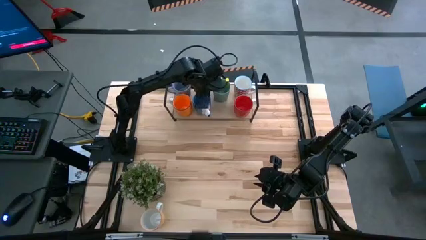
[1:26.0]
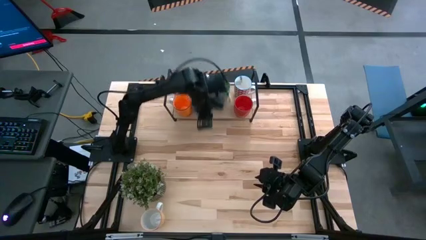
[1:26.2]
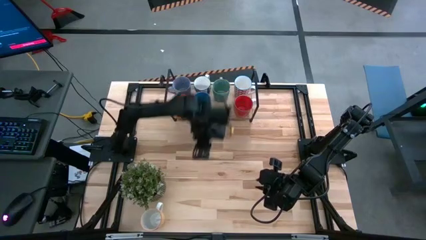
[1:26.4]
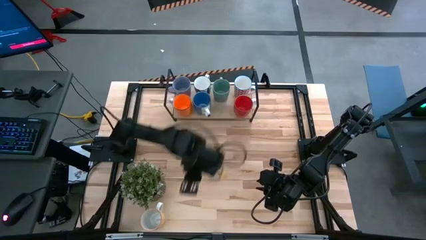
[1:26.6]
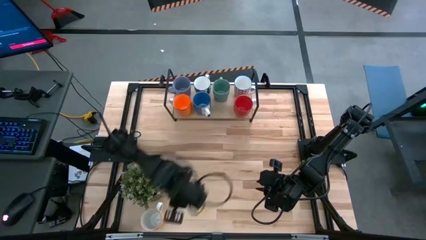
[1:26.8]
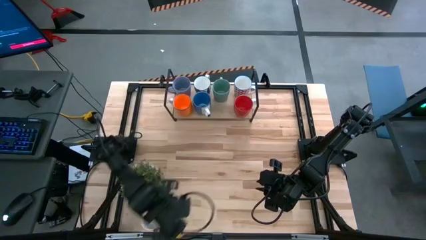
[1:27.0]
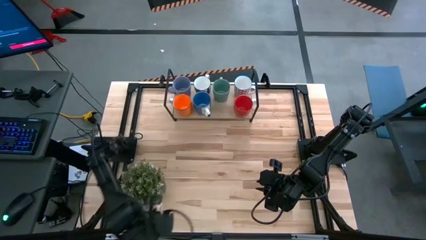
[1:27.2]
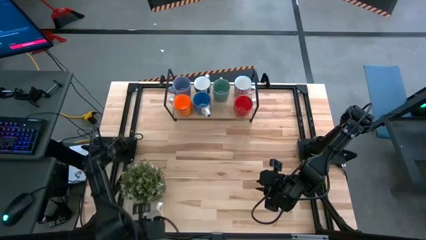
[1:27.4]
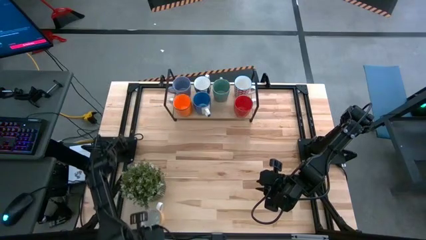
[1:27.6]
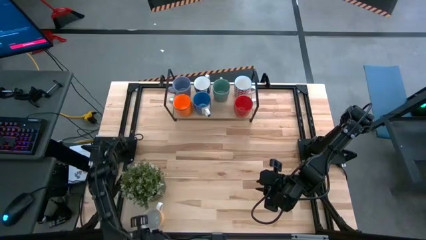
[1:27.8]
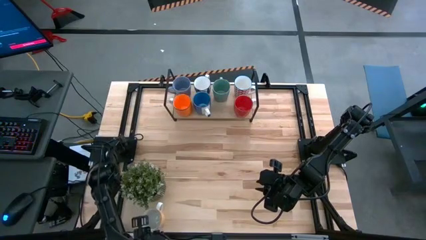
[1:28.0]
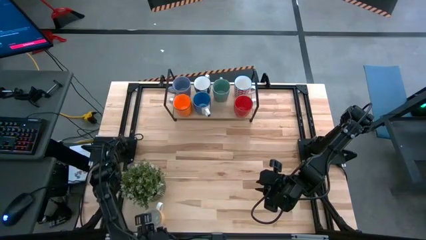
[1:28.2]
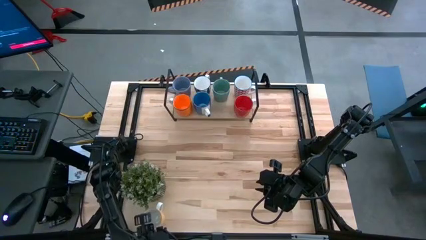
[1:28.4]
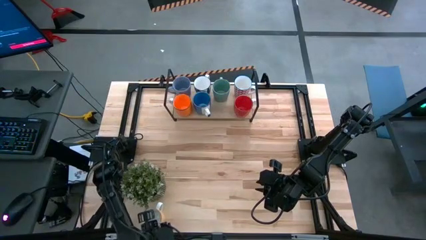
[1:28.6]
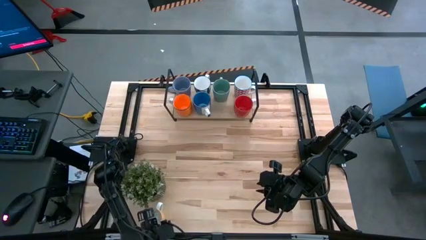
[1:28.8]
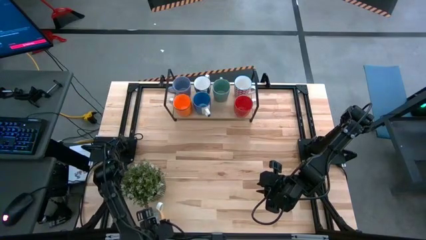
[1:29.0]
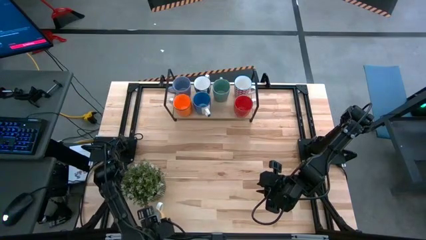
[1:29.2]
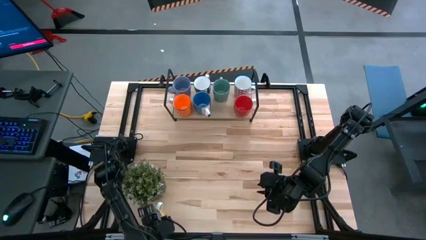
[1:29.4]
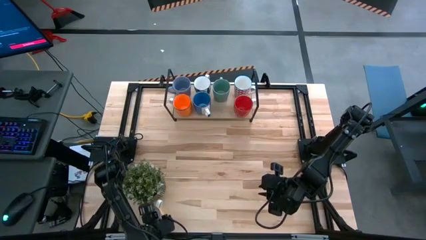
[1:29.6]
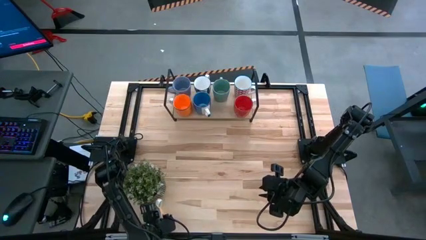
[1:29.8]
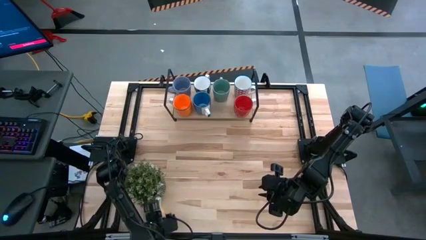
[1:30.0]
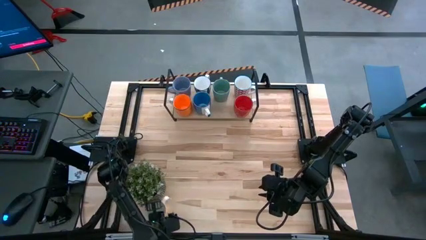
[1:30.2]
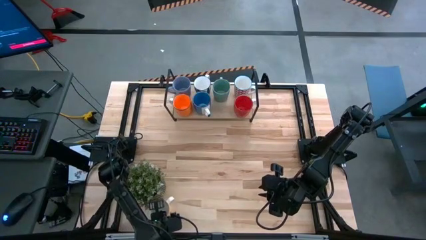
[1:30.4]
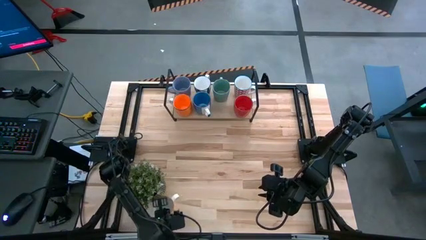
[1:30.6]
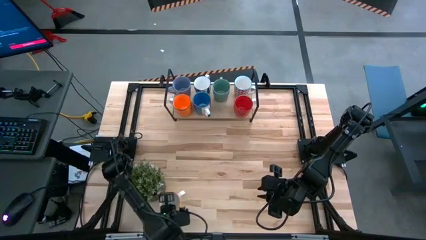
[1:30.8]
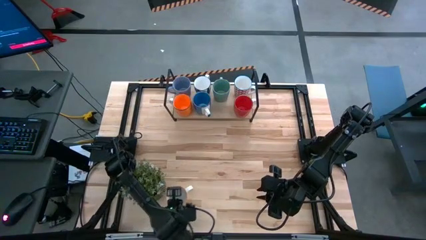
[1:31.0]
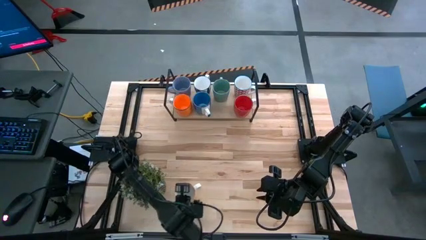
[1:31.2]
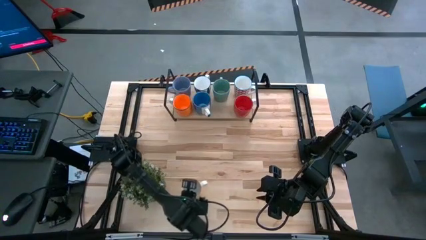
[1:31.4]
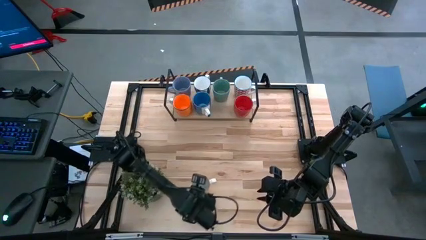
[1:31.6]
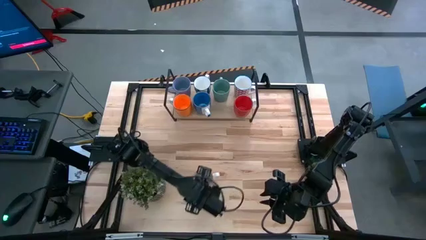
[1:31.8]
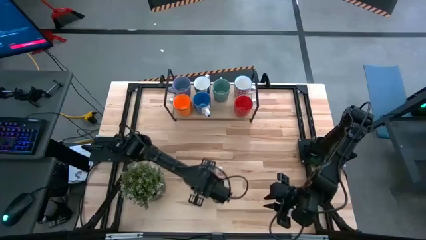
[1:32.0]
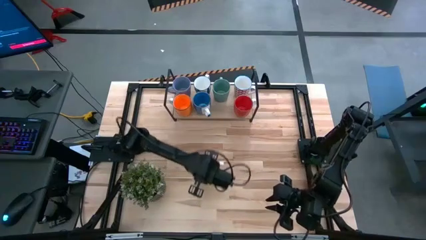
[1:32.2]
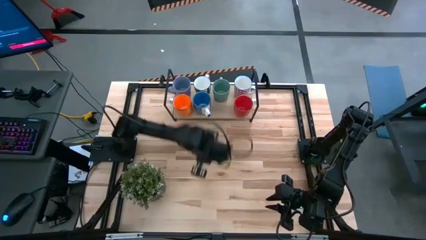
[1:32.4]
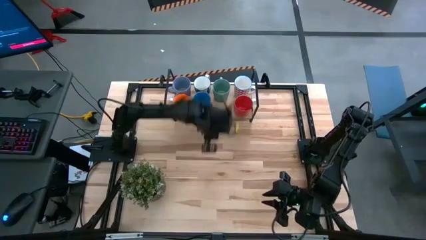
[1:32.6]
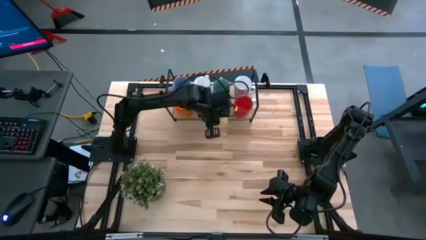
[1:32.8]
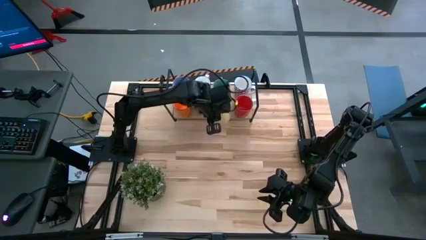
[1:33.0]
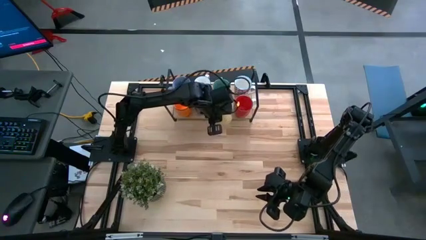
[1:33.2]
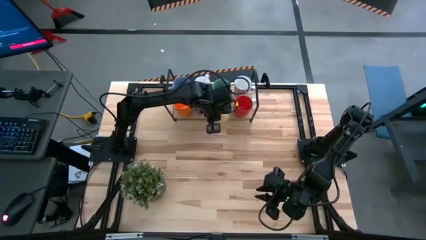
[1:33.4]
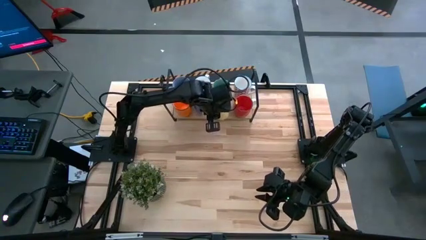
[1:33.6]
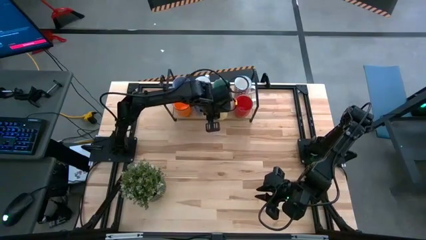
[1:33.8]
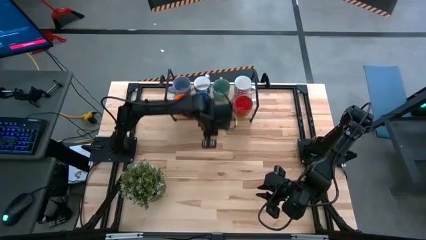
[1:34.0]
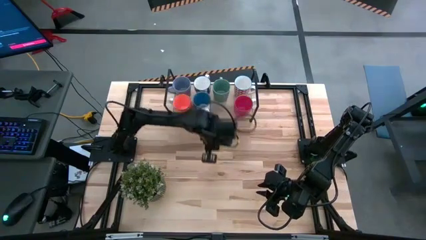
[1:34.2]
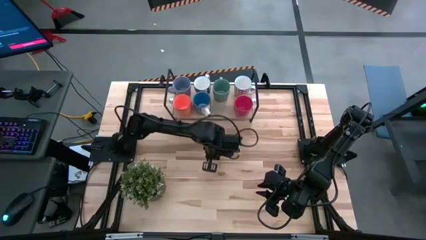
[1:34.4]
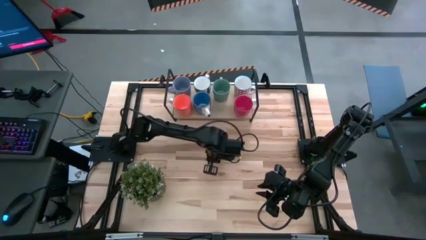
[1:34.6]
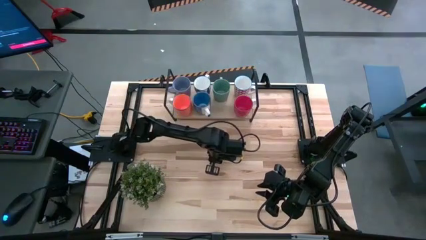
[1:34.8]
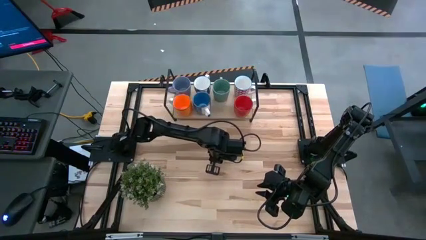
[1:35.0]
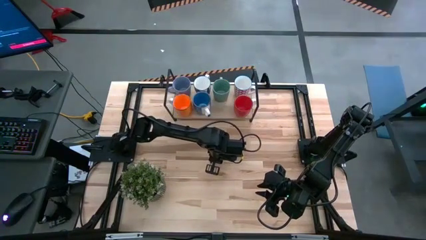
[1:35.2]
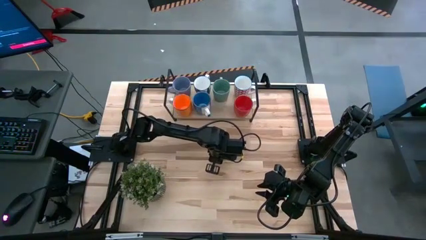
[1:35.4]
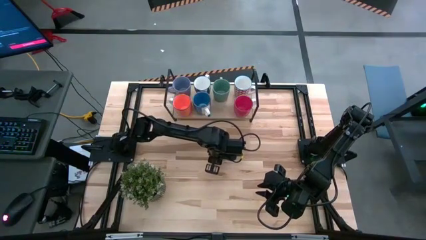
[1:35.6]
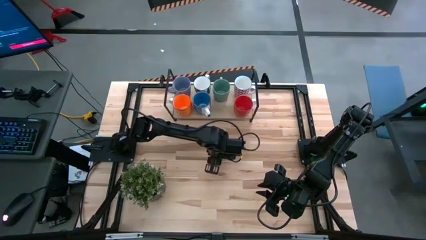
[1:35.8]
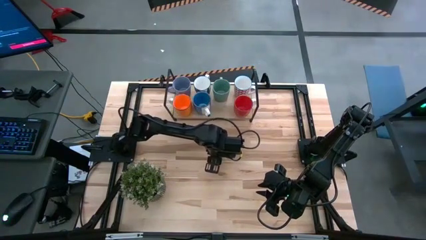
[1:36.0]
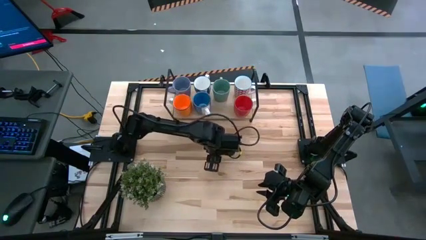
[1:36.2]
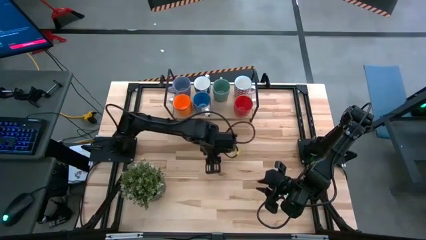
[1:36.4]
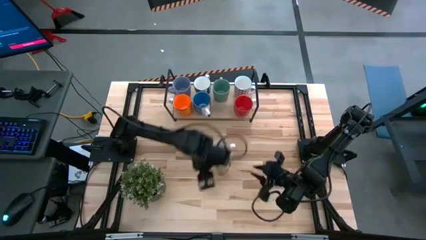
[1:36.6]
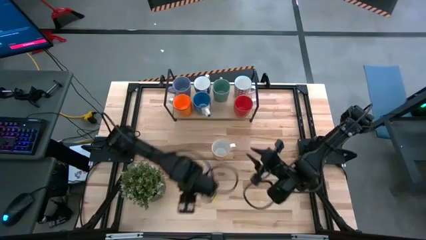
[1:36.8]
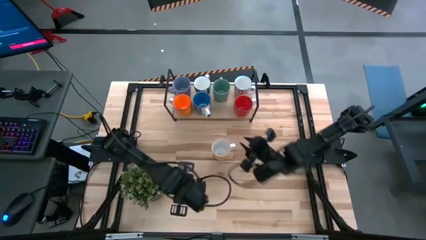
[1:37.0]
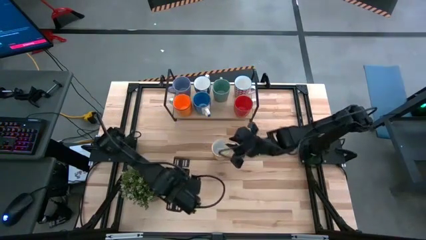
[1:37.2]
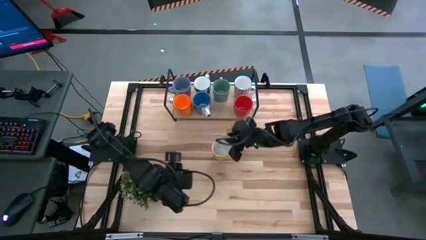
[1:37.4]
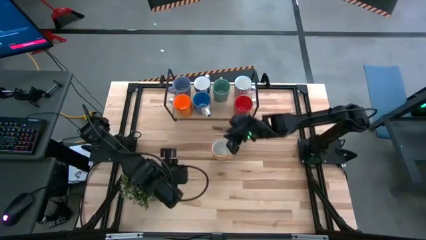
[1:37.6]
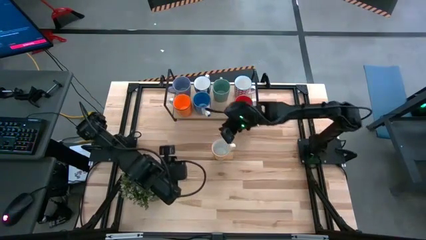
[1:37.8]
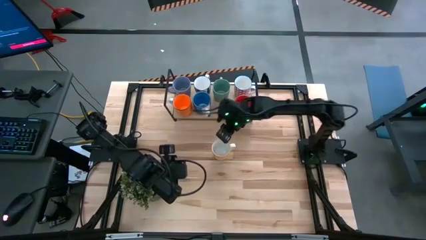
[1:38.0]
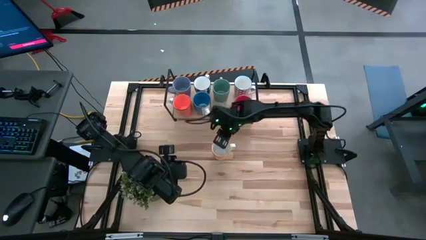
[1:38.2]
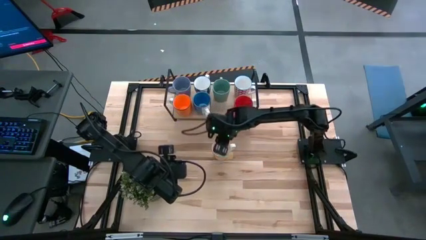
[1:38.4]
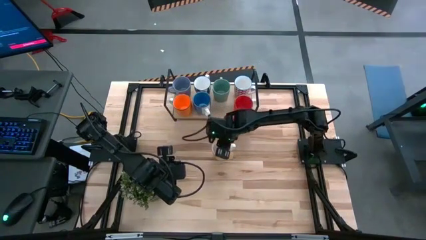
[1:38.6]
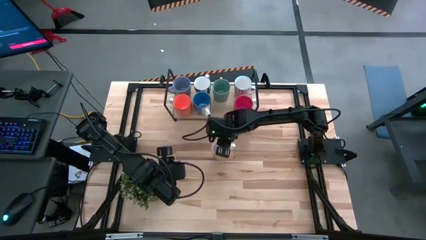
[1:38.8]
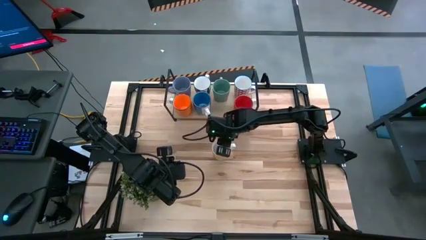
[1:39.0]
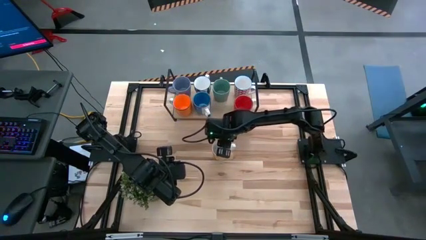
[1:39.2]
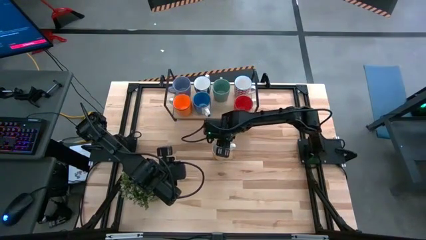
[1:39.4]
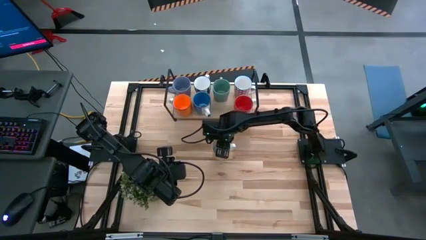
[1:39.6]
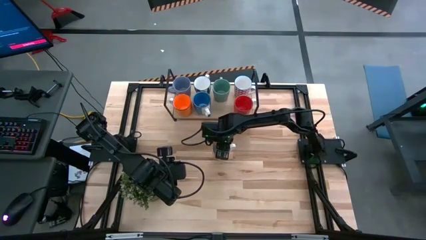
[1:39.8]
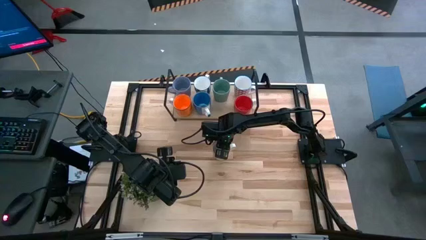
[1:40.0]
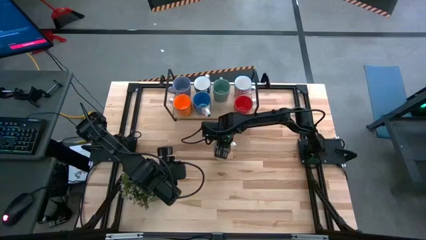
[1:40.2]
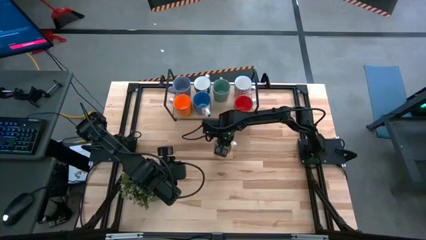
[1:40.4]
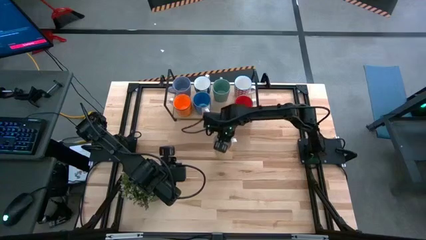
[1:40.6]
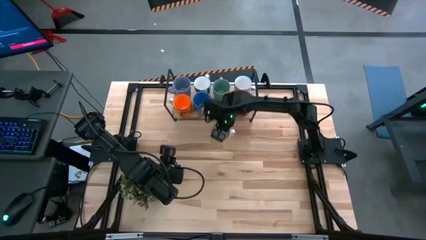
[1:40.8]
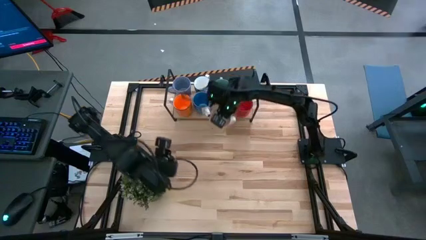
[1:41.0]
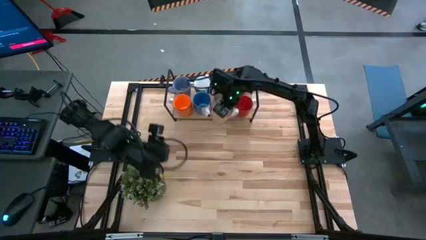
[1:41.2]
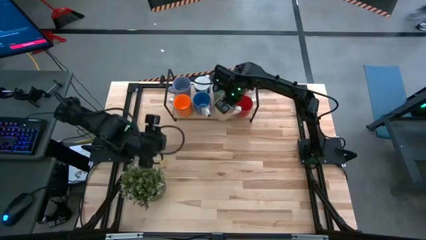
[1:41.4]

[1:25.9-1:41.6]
Task: Place coffee mugs
Put the yellow mug on the shelf
